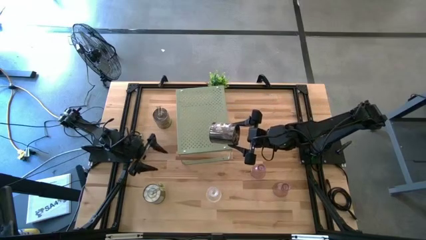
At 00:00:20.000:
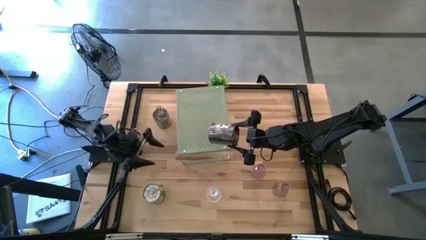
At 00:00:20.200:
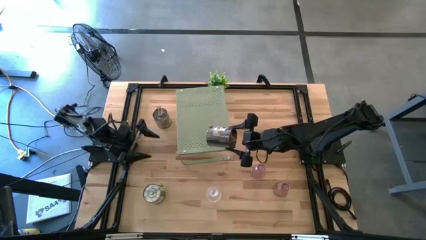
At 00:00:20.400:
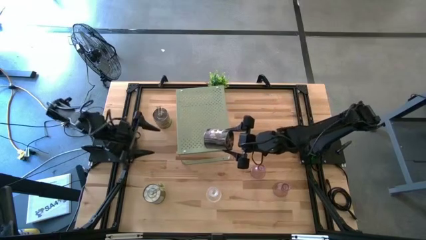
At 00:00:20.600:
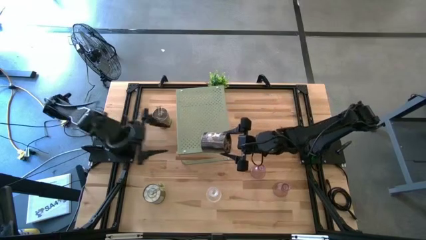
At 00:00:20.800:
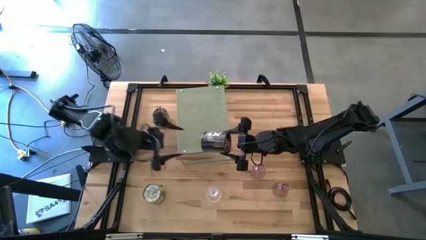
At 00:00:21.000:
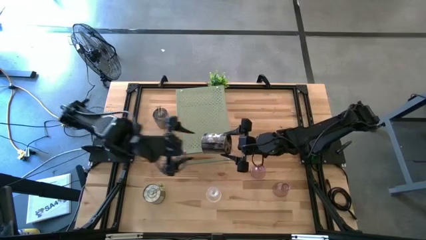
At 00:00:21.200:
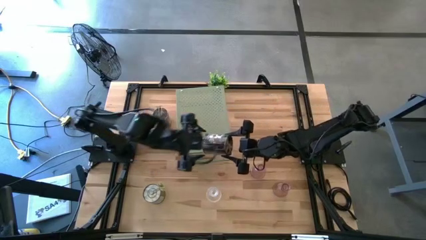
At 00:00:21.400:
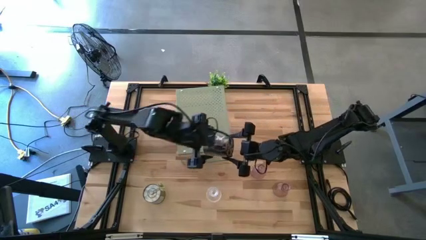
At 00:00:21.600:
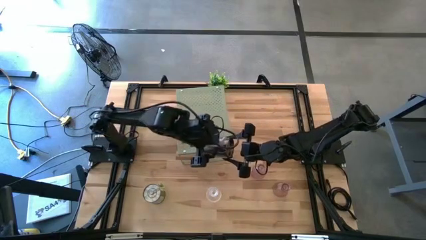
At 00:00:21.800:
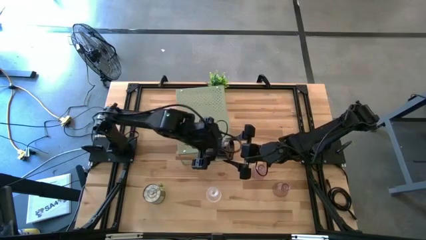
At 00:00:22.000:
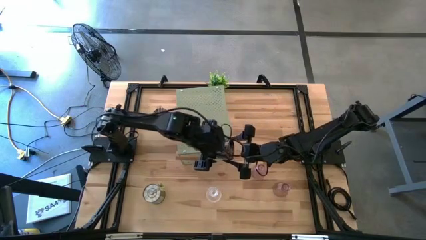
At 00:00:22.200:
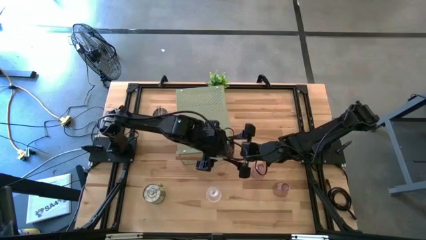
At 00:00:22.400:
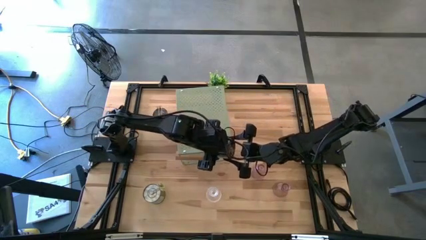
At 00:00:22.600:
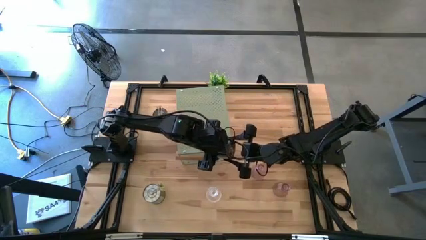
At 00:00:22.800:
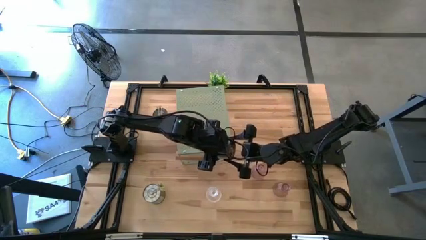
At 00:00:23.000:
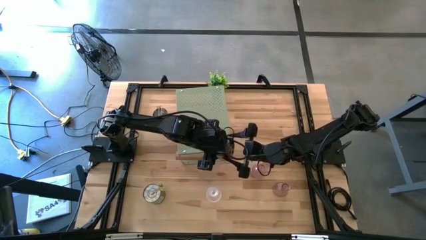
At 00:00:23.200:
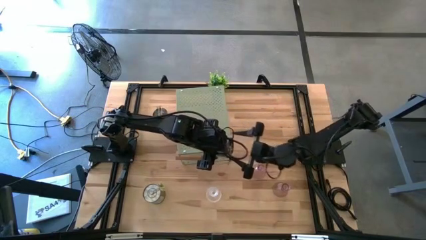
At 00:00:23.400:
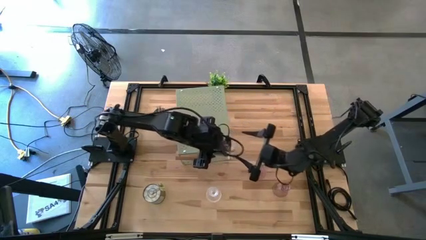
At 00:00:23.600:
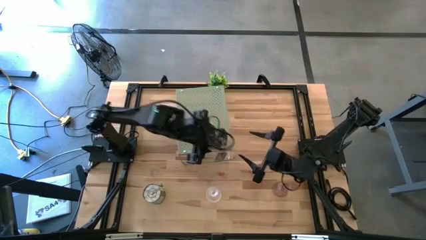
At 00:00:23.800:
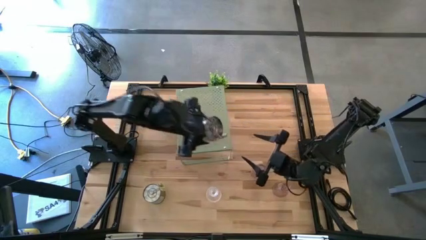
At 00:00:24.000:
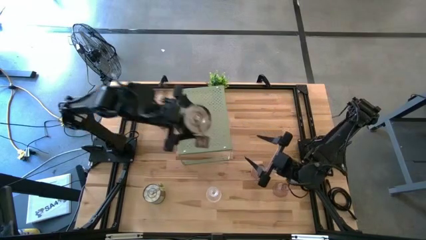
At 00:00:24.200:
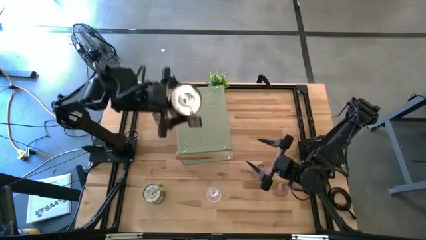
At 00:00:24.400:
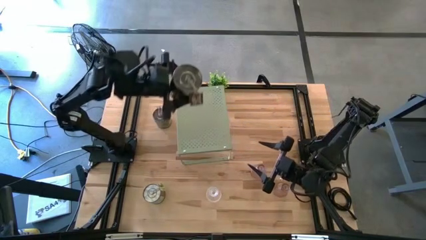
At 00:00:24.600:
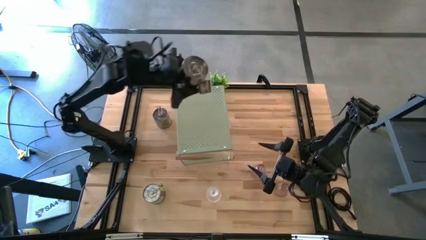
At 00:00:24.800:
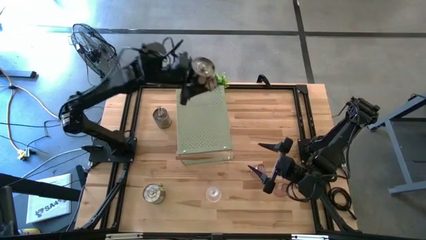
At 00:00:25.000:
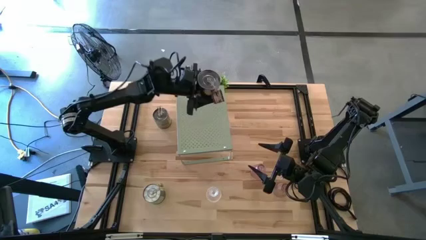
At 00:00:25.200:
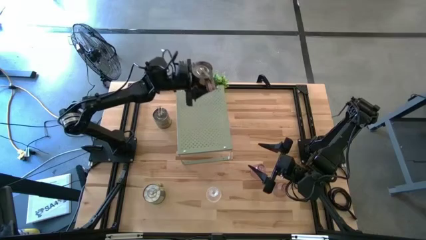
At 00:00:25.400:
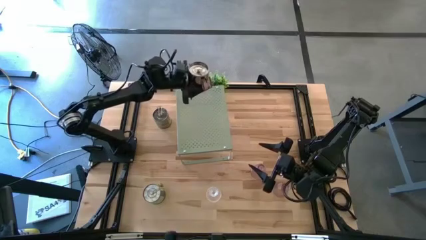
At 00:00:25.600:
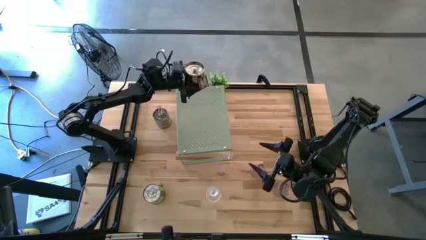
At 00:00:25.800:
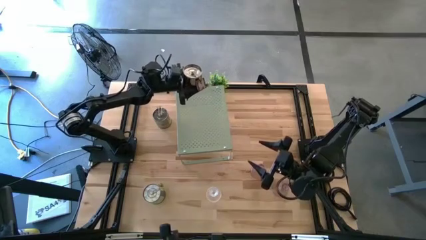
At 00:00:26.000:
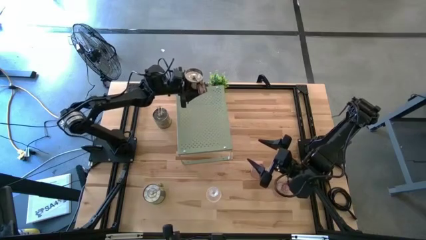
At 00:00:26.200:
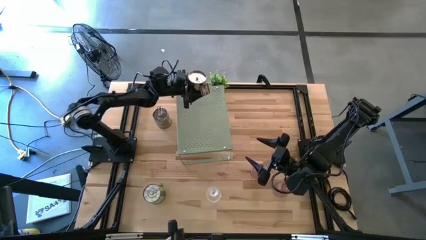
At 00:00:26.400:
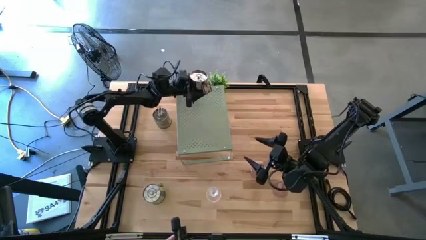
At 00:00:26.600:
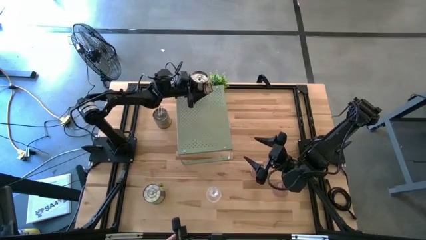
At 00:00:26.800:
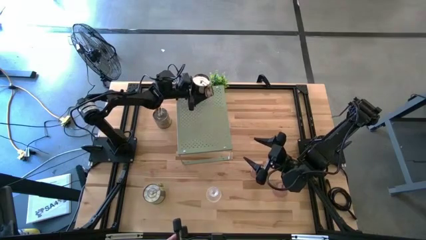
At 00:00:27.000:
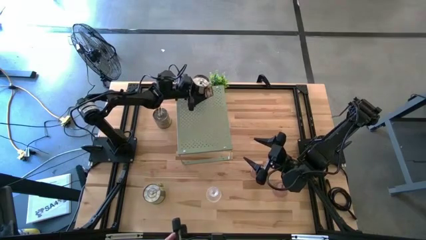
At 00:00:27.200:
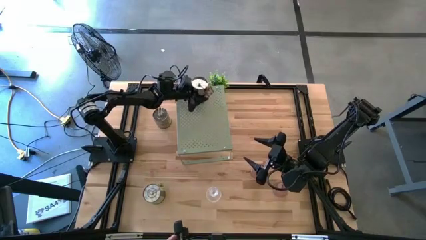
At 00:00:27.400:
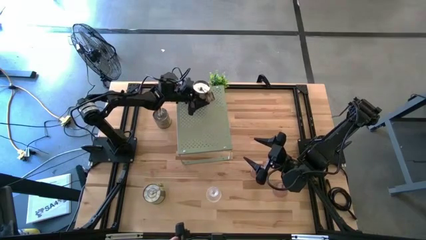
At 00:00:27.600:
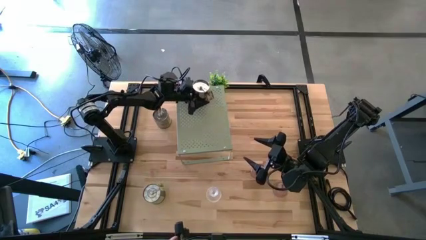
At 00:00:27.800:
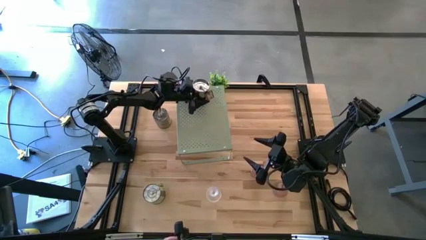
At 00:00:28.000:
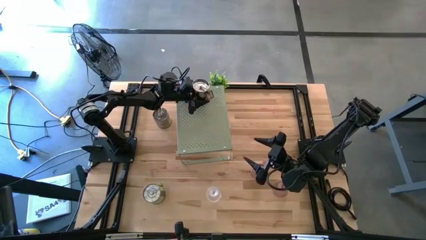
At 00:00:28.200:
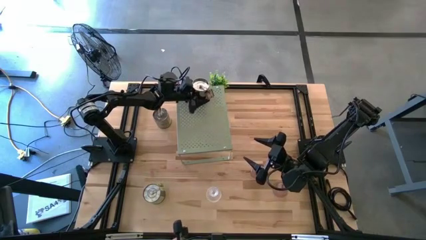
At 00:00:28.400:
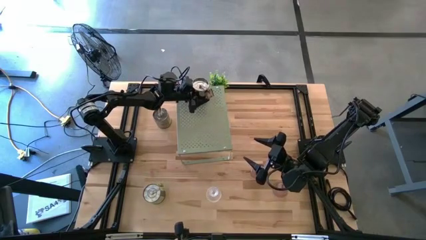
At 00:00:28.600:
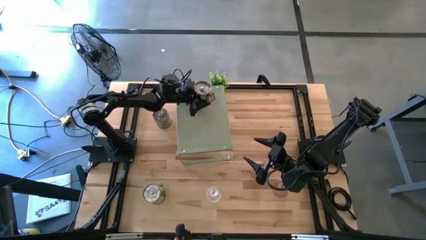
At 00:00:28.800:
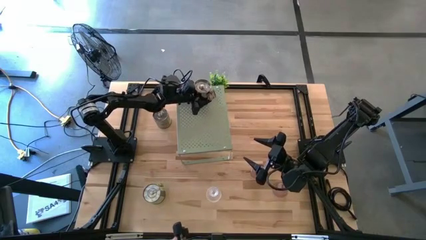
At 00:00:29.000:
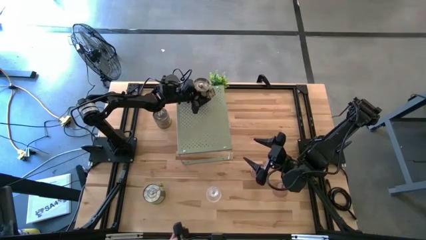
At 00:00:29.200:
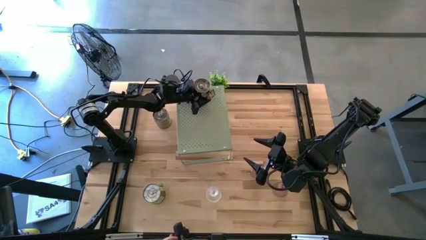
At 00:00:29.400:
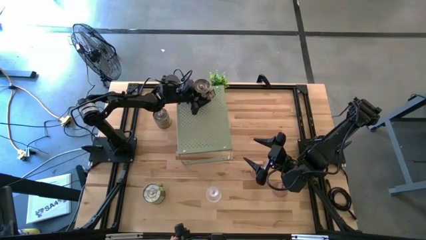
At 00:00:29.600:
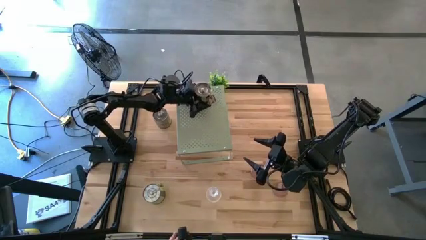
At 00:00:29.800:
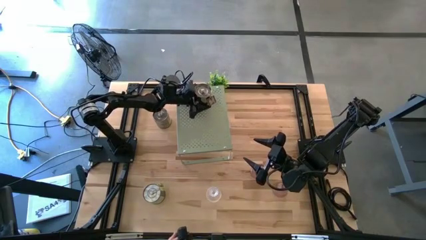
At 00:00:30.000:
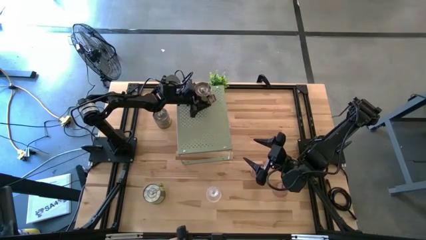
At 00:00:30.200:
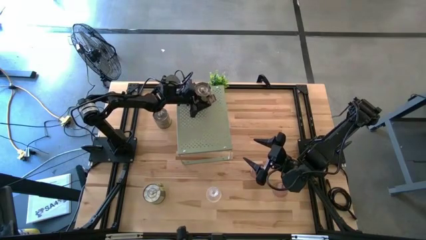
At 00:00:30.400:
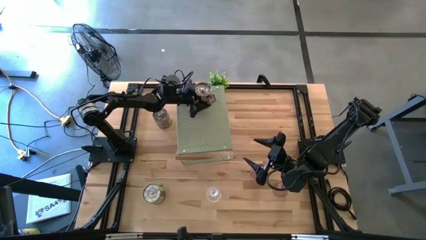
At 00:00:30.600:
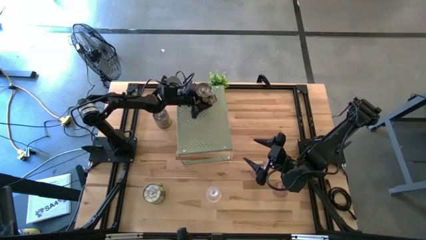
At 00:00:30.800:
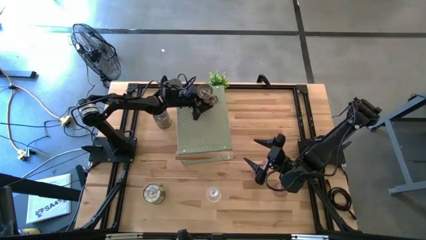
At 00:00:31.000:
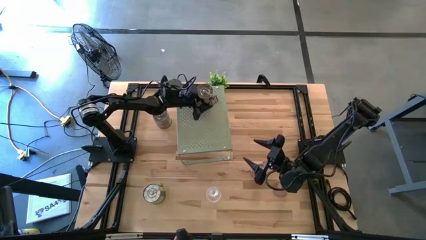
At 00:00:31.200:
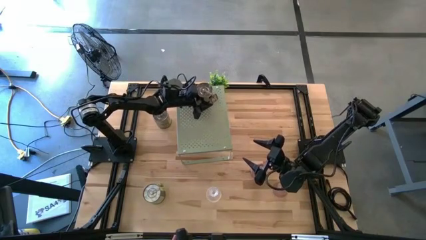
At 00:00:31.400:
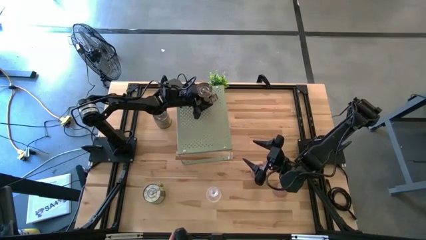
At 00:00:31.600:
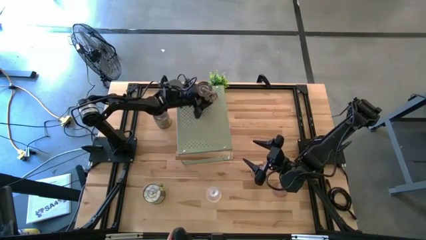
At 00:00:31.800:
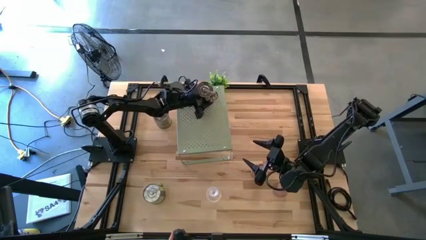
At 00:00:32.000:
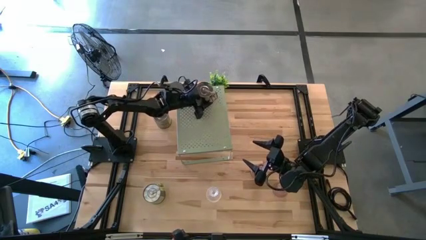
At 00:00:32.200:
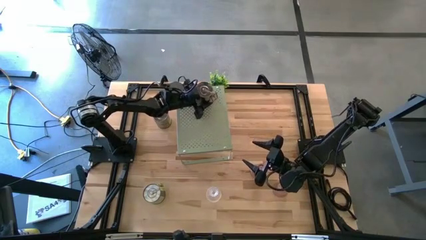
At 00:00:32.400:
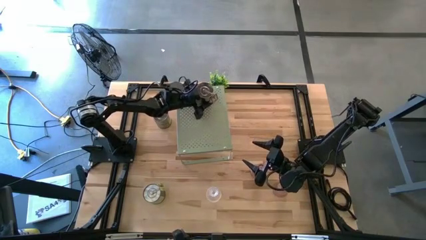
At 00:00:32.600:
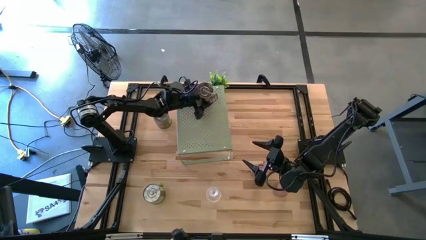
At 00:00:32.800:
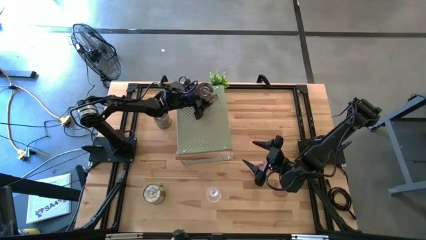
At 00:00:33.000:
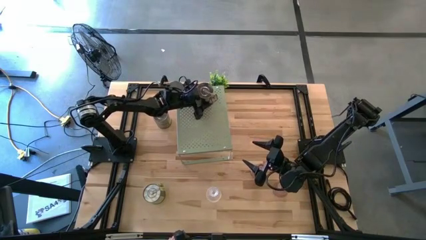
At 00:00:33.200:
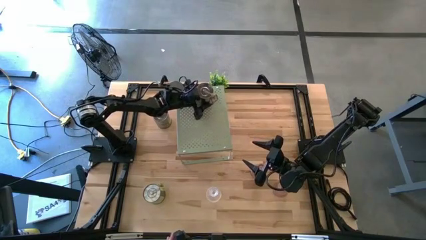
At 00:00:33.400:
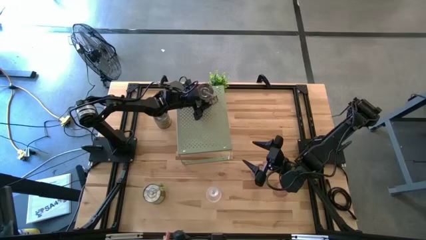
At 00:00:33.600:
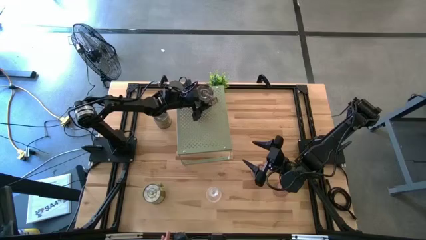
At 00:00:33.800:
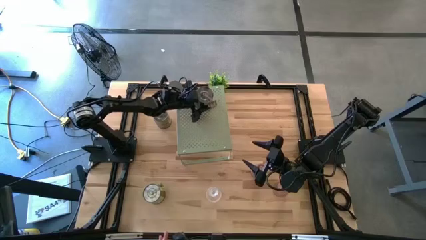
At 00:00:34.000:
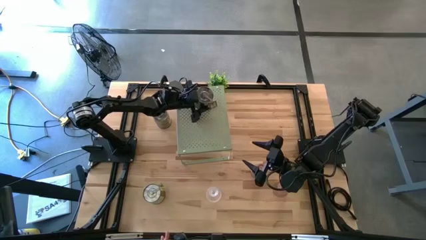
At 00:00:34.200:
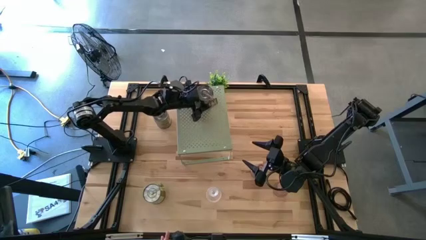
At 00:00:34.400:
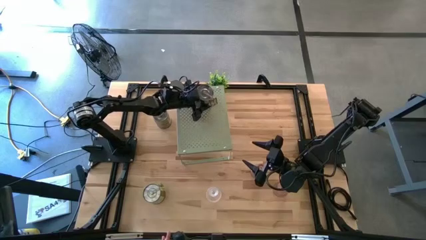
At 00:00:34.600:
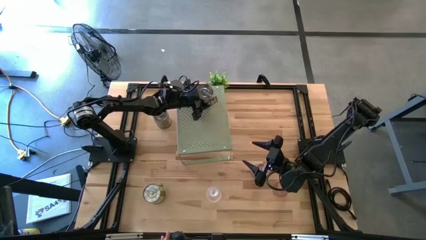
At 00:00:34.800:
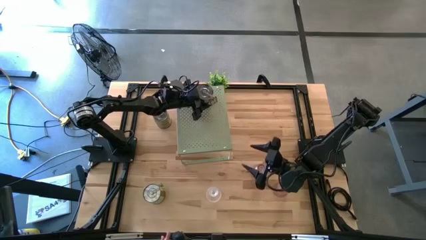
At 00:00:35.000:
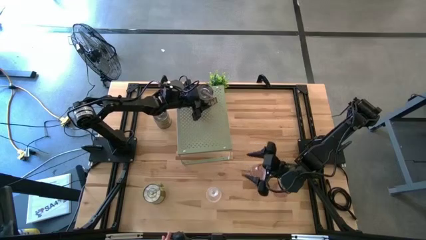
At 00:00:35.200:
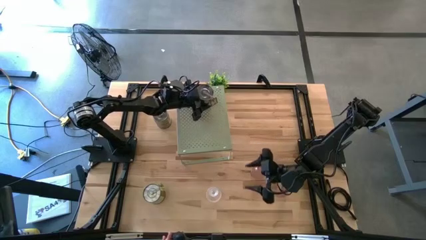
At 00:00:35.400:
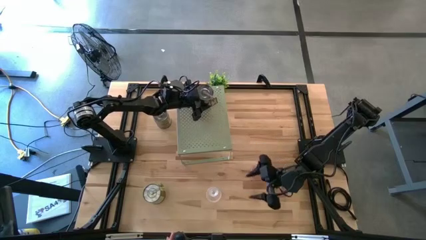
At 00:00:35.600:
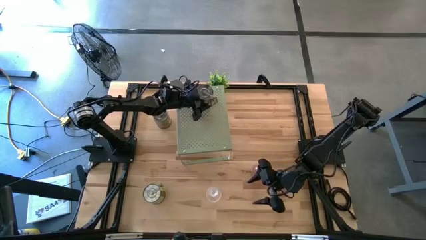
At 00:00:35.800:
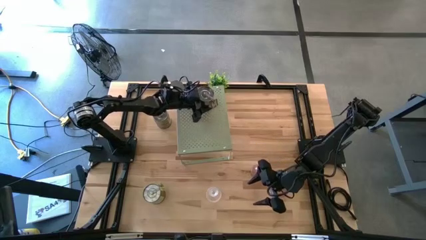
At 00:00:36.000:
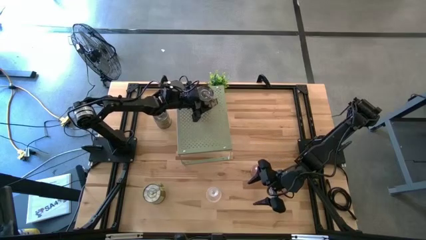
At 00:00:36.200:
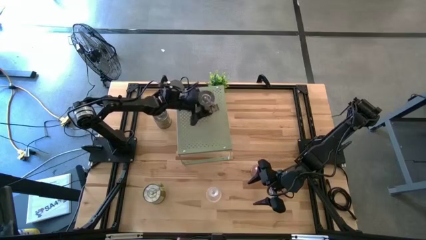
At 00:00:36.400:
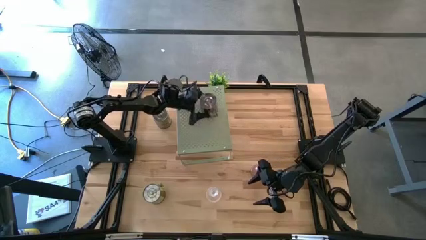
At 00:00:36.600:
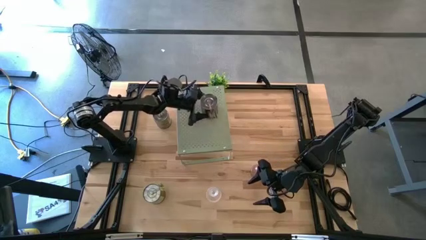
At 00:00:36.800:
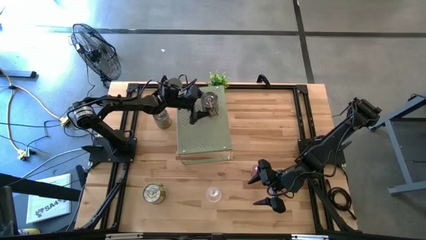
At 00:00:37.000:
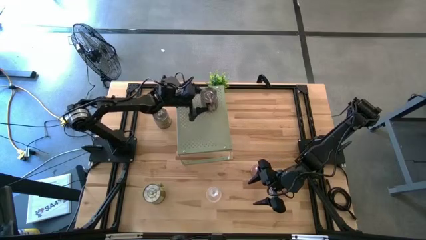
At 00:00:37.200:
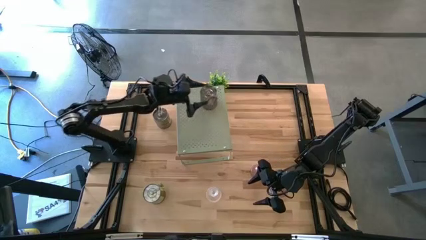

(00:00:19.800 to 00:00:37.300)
Task: Pick & Place candle stick holders
Put the right brown scented candle on the shelf
